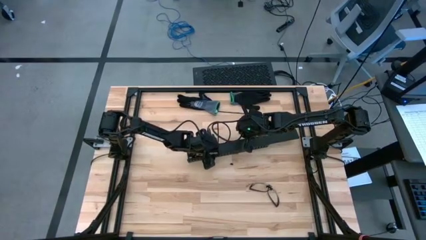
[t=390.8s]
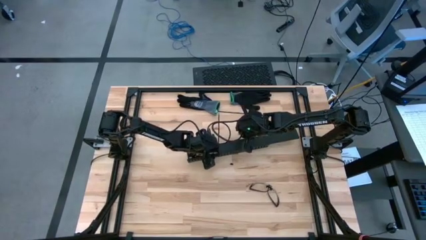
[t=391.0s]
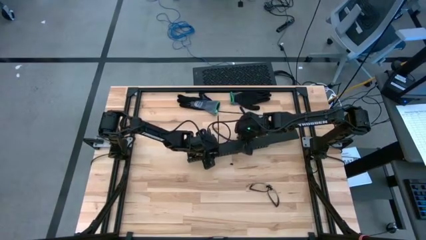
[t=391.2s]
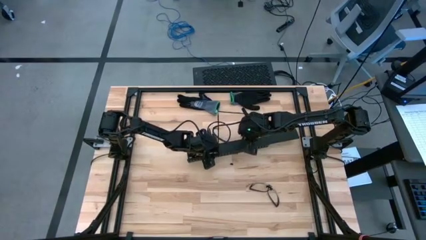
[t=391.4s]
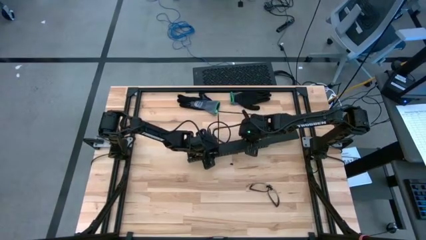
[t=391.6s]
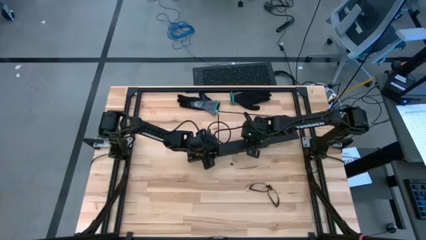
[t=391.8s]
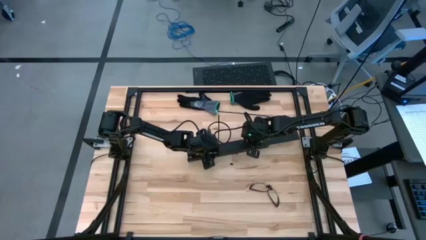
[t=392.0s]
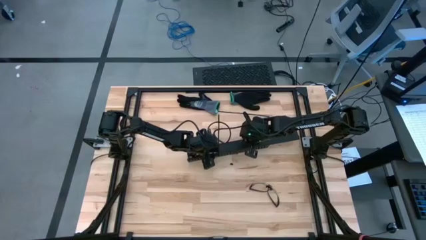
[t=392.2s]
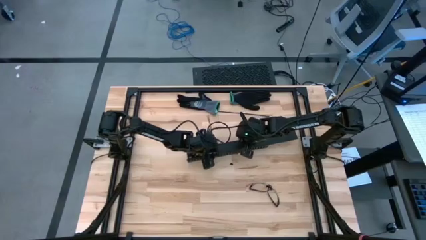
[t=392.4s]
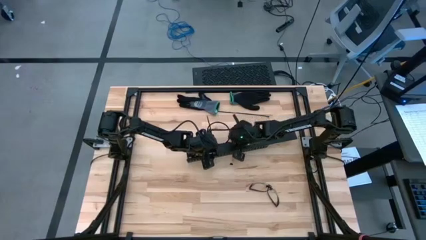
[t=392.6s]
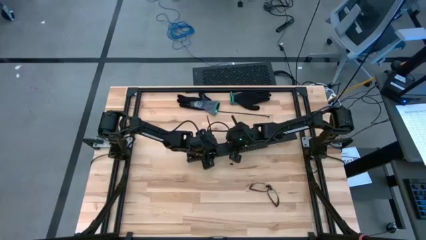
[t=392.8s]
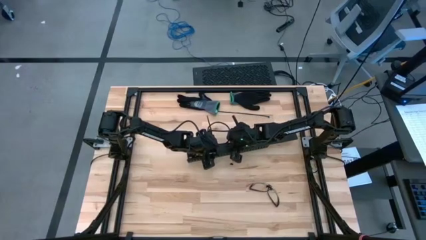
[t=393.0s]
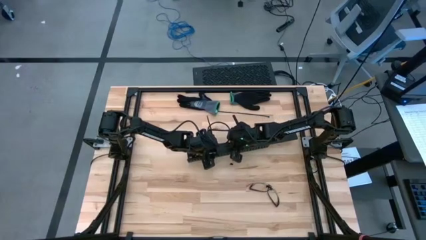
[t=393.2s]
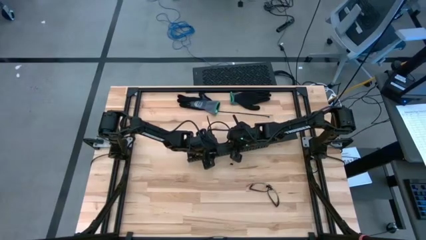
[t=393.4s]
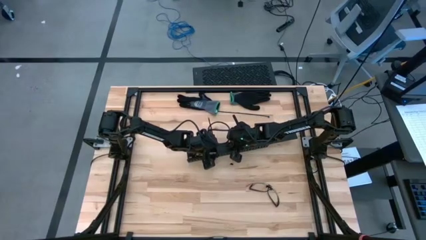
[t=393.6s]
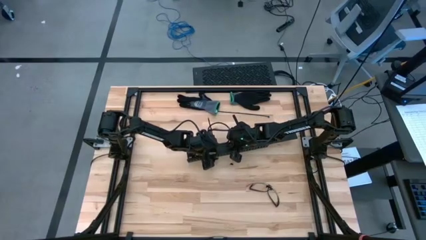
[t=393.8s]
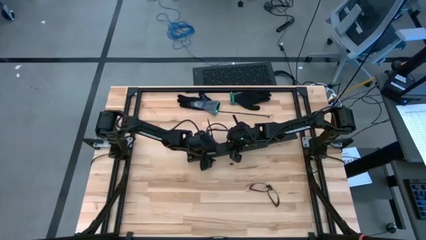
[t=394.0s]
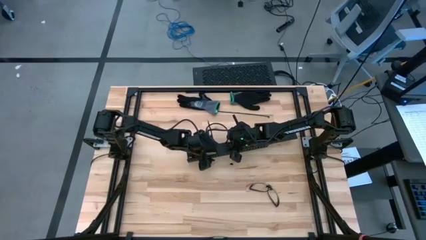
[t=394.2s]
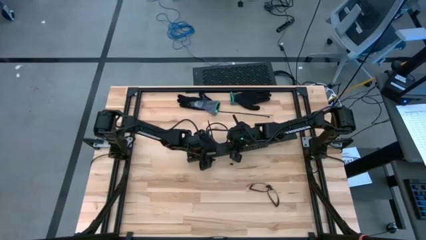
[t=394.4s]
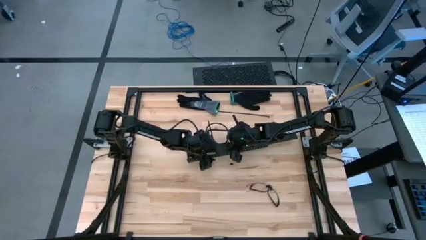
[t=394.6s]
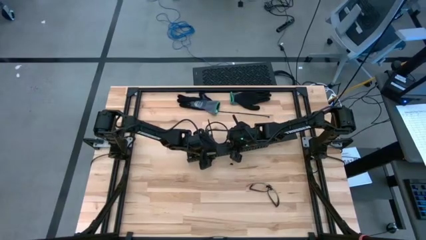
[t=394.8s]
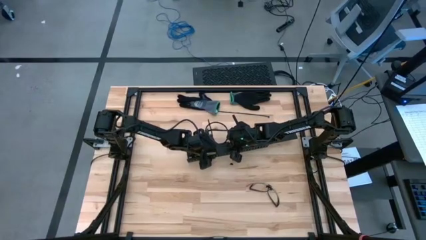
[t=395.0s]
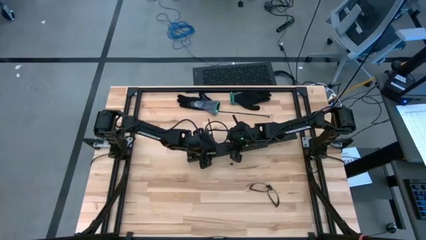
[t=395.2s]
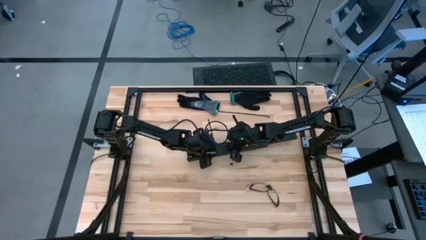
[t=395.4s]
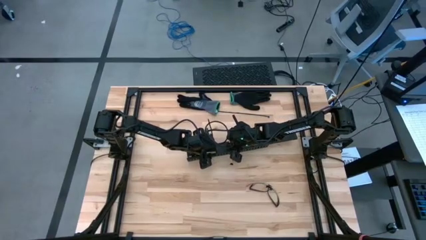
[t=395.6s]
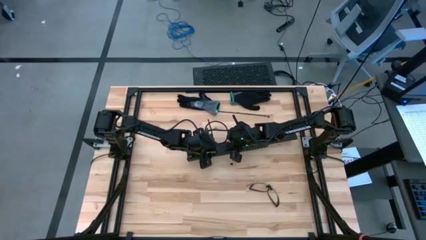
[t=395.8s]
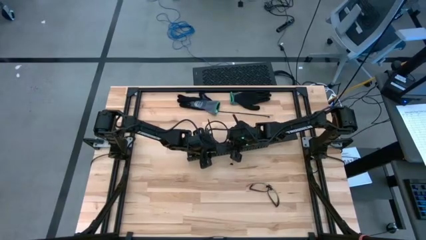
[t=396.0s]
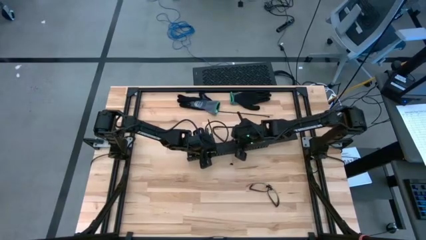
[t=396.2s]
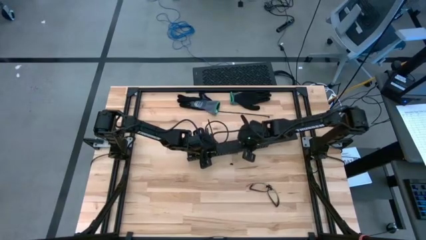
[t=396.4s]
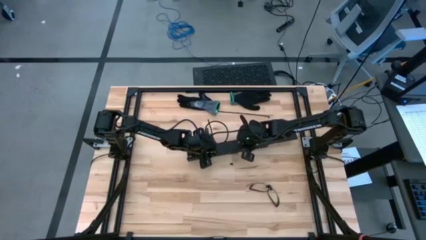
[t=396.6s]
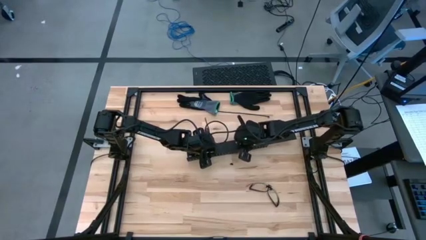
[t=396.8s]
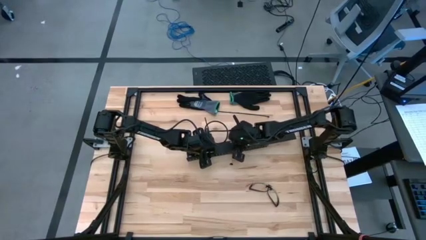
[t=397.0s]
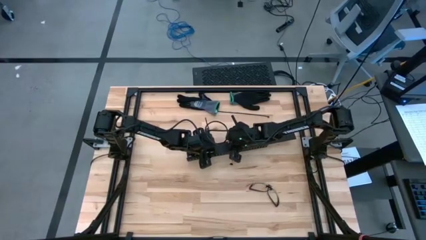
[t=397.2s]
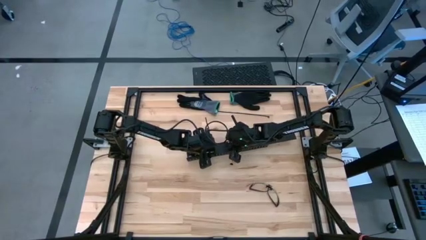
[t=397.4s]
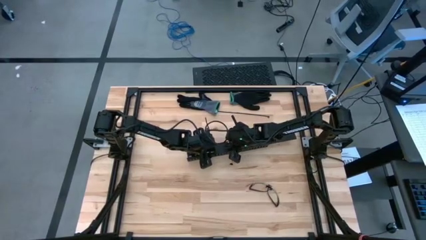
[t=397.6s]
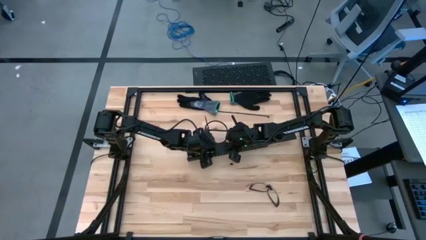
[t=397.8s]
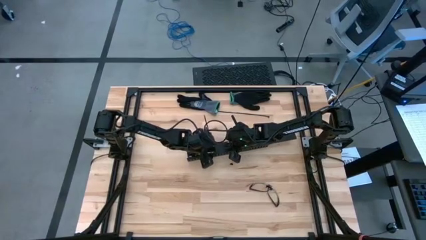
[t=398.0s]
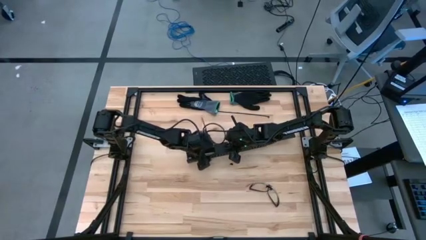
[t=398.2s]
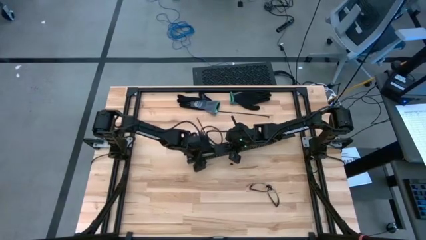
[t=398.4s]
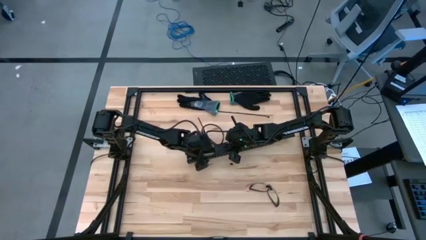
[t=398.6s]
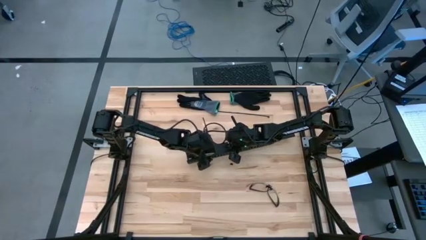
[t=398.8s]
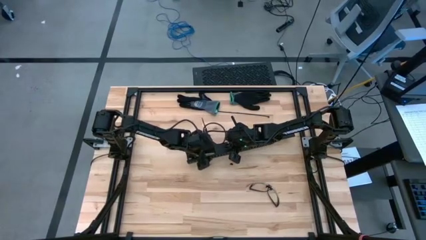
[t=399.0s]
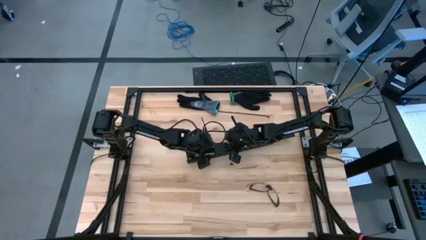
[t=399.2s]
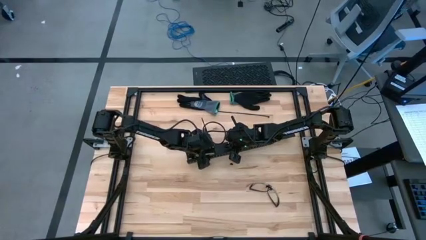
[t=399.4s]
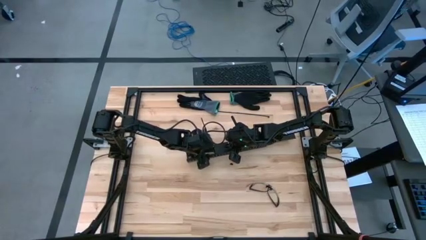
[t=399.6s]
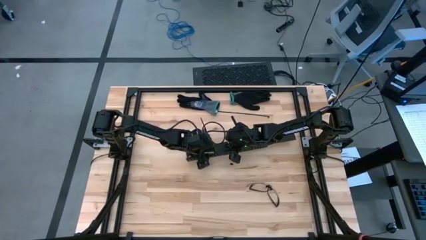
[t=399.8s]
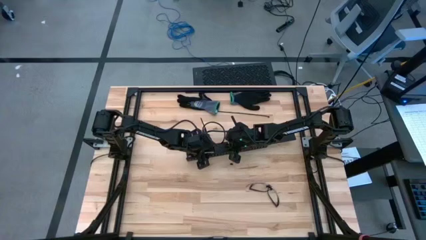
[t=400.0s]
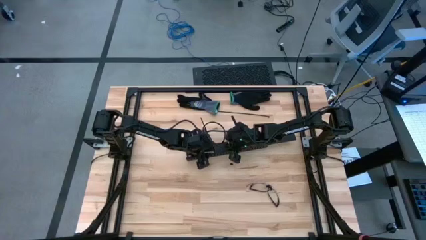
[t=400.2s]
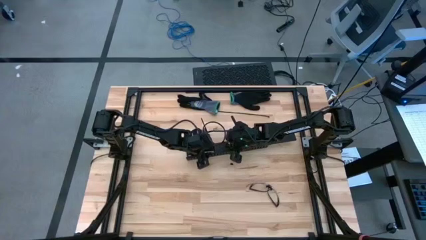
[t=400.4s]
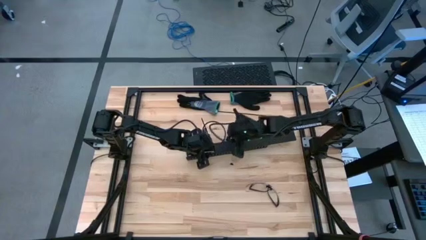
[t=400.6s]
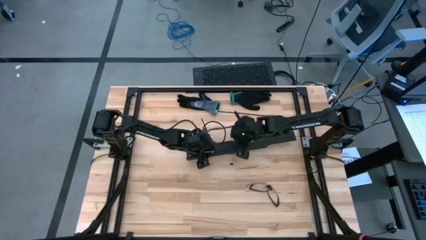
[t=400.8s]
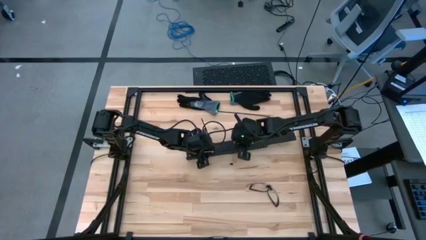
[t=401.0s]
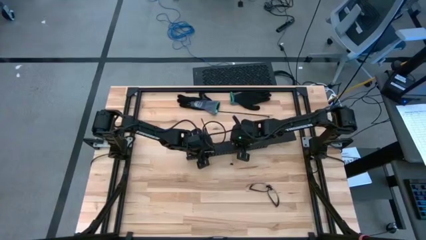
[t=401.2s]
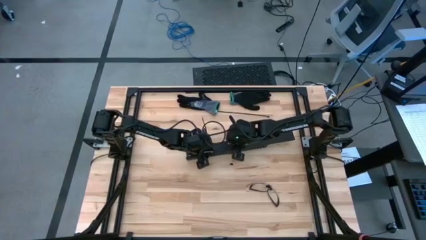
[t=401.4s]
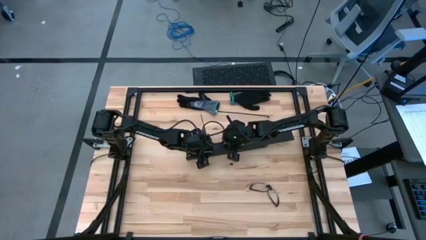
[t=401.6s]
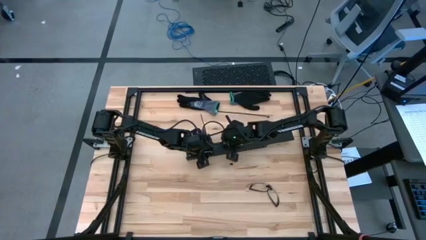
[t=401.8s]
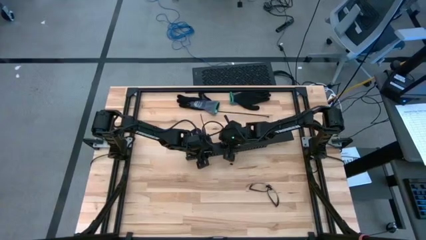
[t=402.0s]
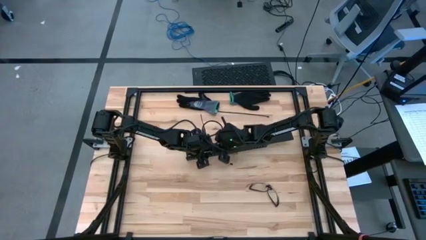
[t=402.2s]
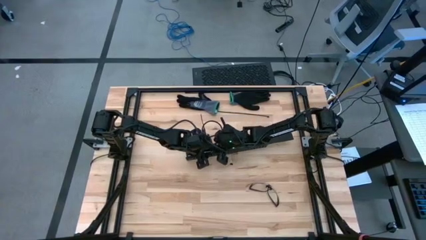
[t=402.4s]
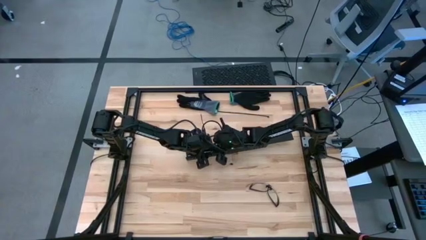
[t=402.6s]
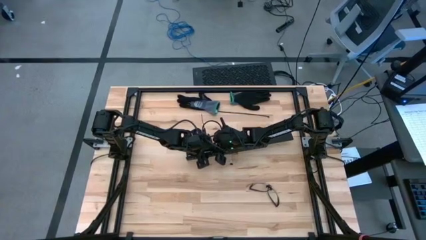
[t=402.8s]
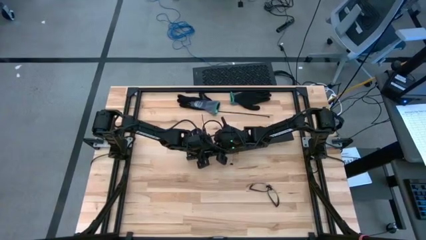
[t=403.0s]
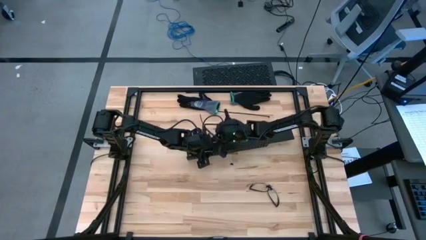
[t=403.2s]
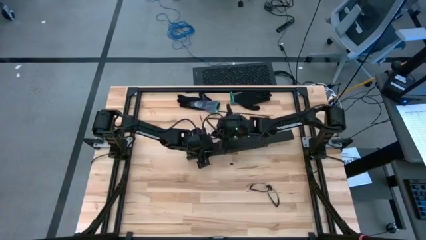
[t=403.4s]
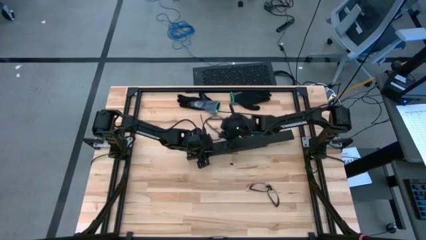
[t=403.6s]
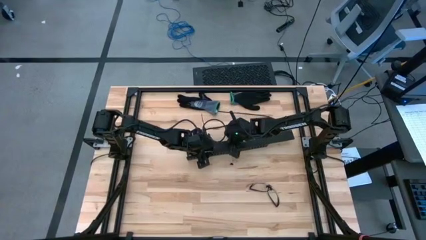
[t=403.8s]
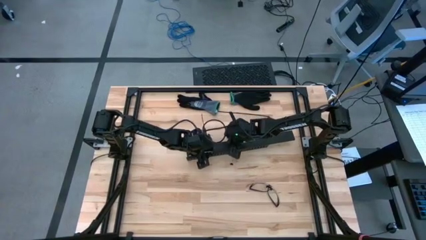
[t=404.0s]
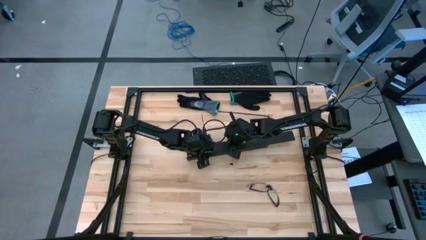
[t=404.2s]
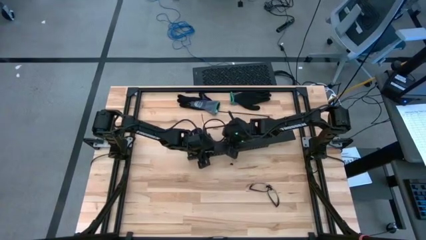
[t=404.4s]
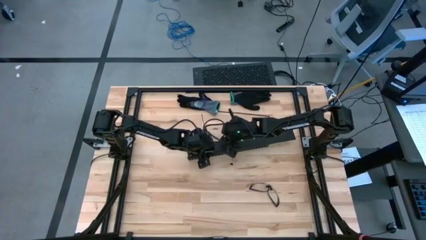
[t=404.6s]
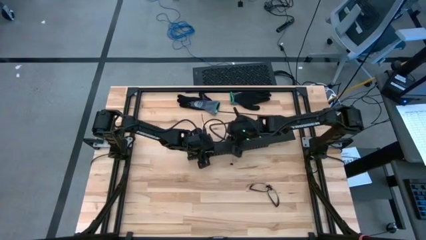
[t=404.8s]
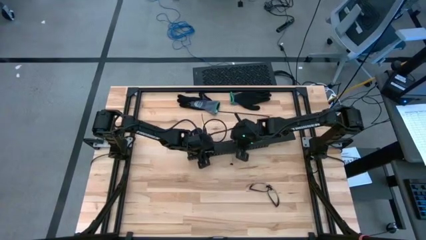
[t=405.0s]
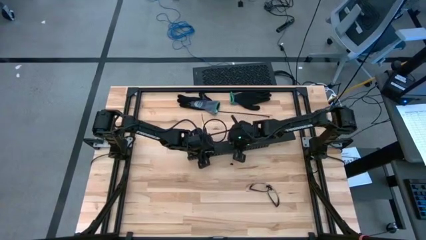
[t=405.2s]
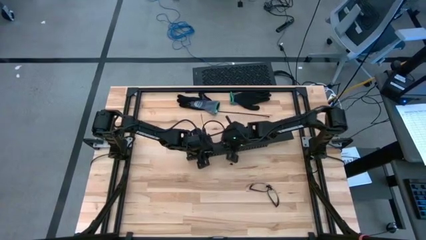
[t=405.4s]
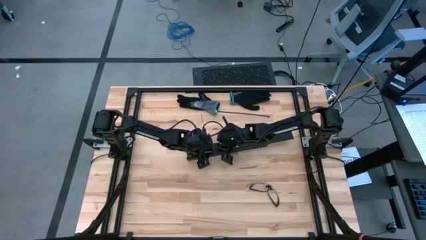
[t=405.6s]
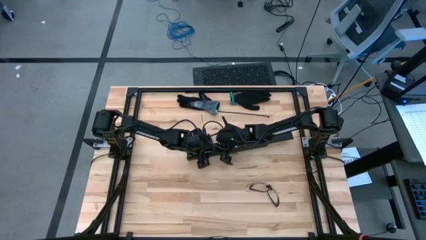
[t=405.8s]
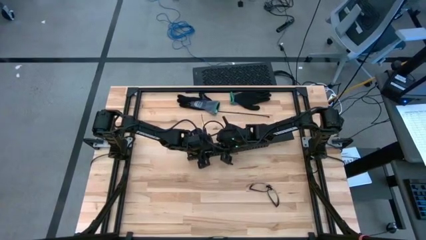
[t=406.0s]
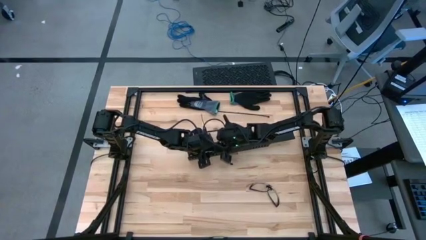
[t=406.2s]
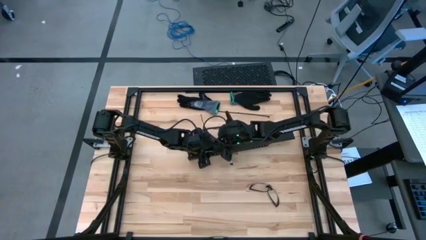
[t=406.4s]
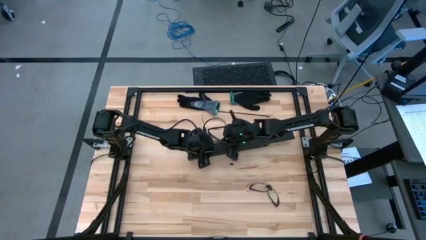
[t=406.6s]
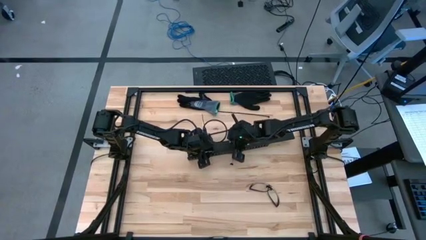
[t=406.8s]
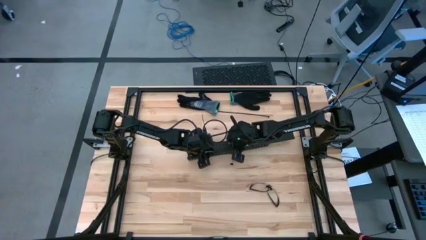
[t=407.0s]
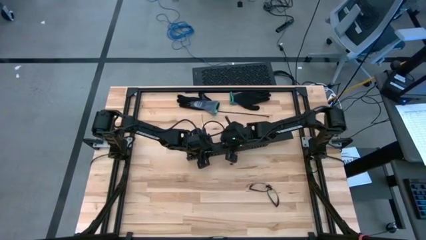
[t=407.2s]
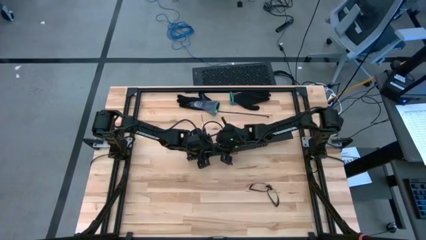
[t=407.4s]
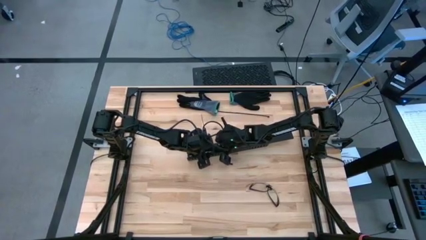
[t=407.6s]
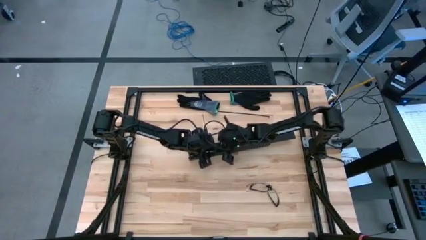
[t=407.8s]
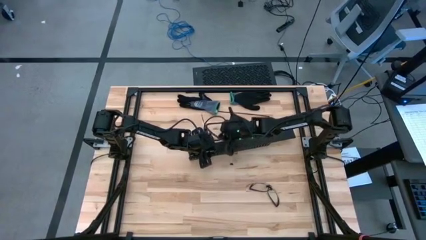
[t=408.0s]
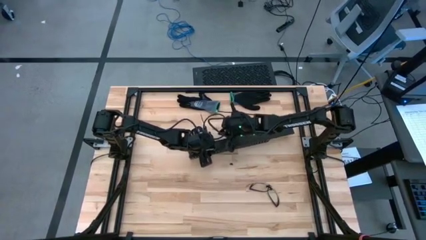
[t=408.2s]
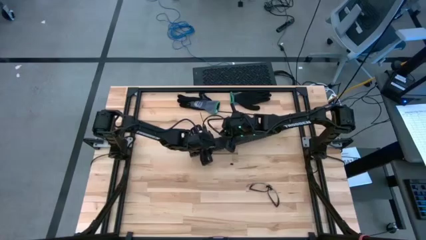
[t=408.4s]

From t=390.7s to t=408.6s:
Task: Ziptie cables
Close the black cable duct
